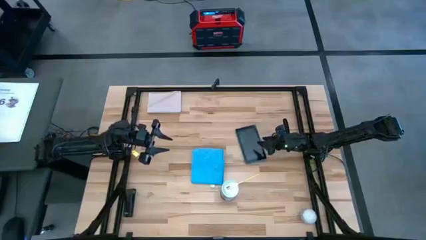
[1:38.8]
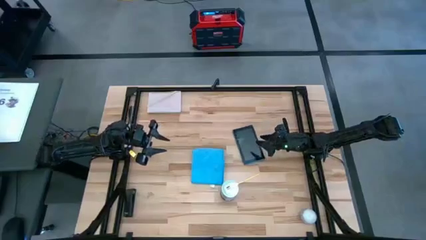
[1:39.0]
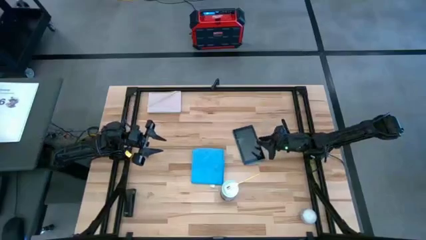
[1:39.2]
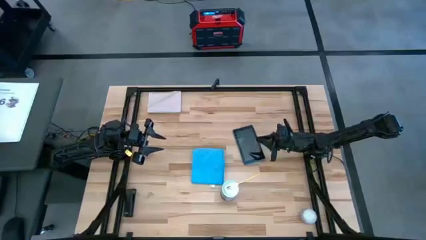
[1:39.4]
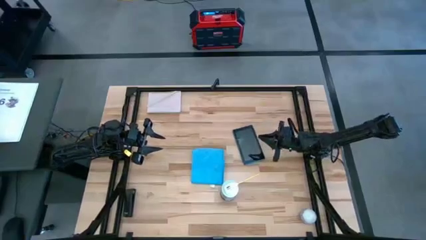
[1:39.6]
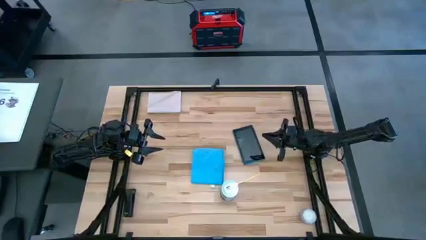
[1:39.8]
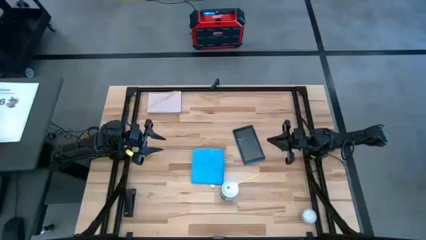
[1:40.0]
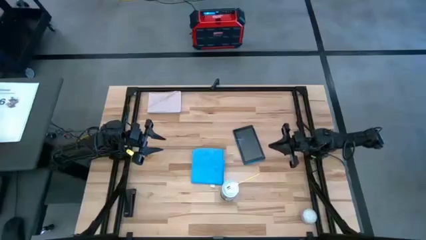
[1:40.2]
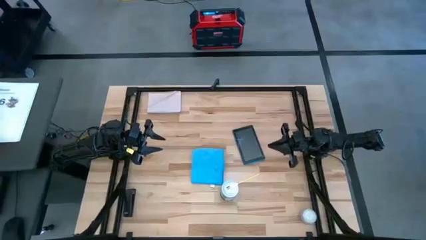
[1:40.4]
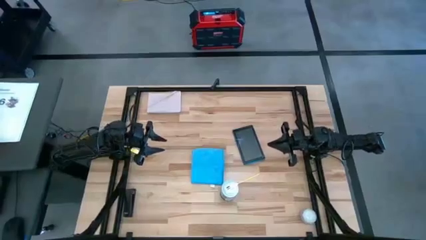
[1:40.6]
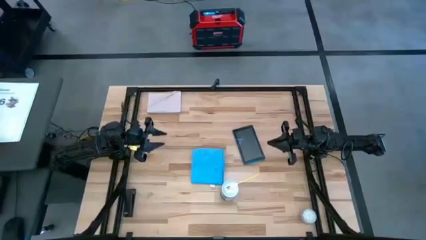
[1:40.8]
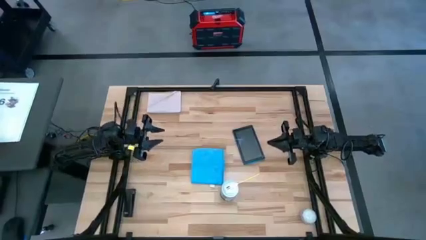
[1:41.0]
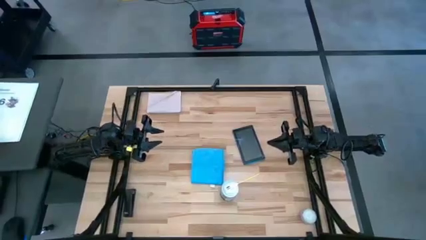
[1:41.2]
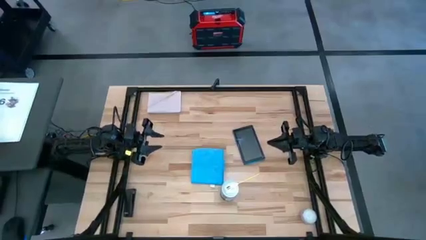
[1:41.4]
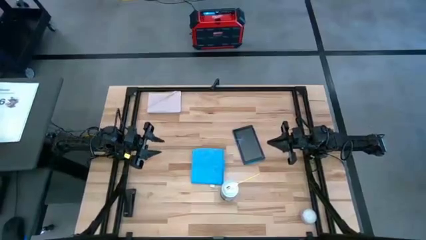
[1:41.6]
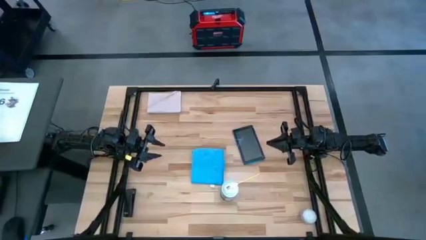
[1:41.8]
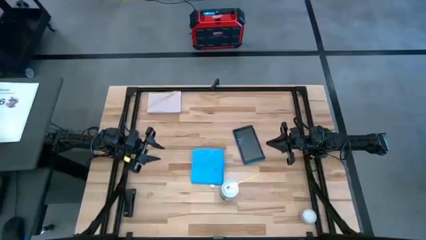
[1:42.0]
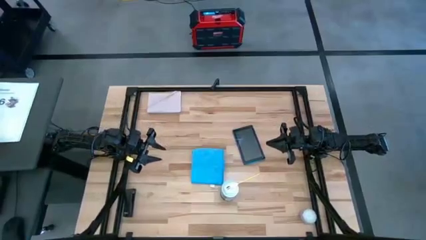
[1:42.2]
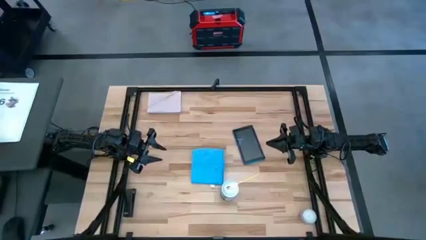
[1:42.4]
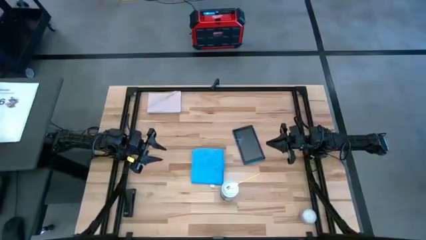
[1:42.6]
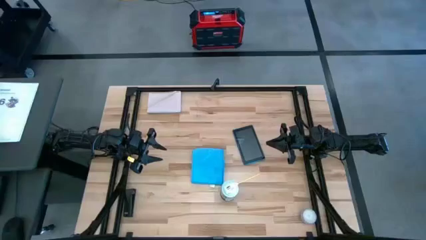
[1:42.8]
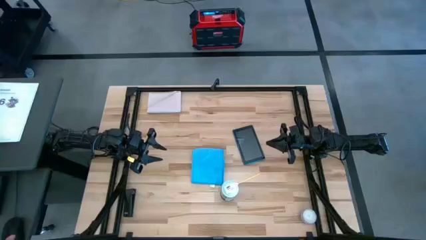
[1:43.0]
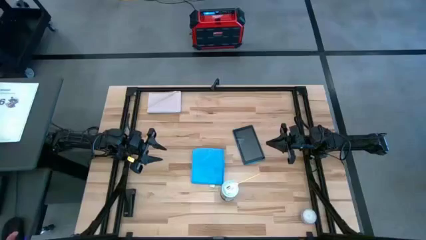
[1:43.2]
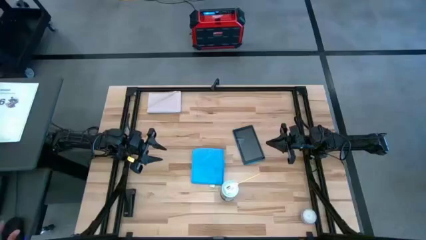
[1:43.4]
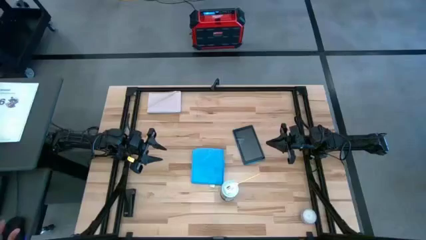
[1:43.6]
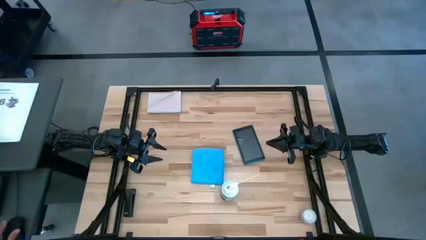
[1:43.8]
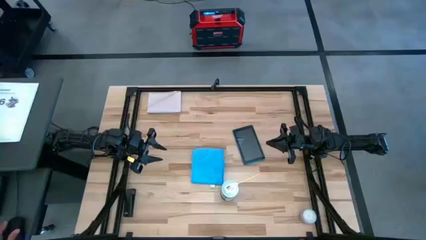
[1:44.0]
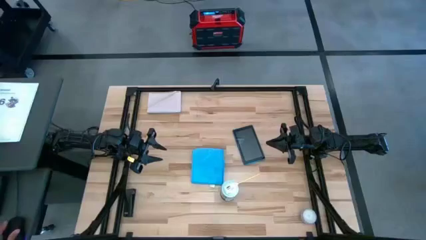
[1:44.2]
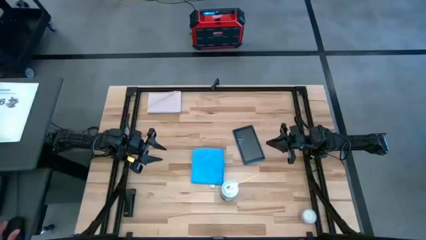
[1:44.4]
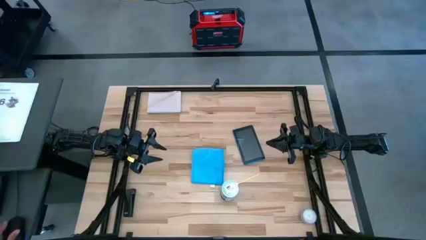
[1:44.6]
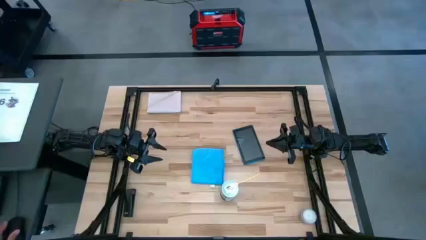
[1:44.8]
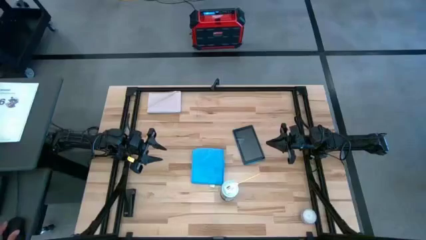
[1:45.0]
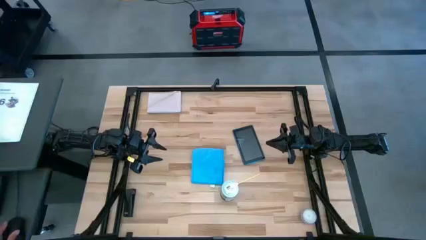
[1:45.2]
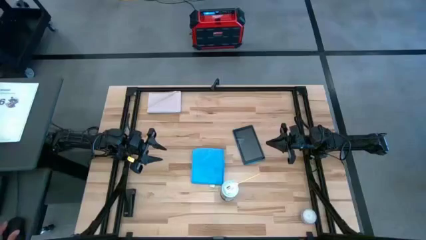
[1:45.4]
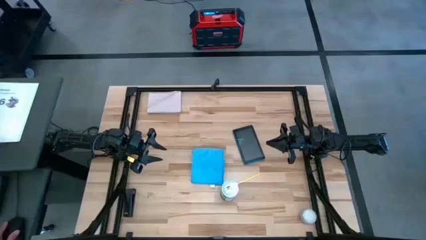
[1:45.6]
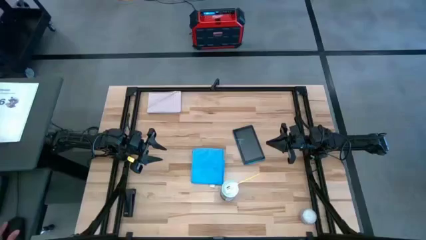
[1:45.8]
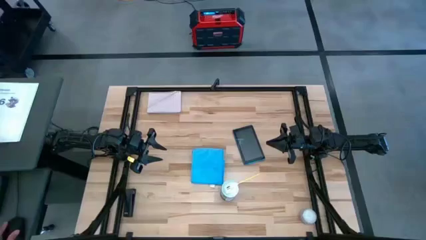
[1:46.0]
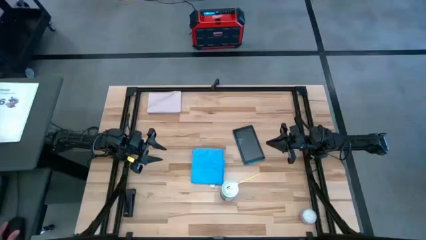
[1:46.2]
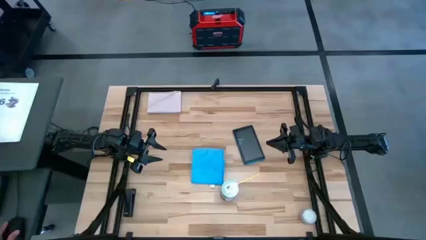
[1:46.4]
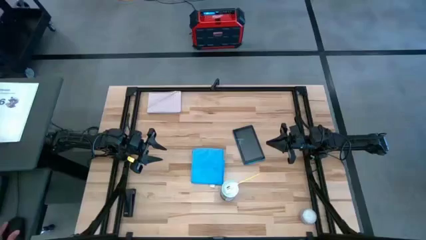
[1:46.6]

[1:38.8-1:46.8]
Task: Apply microfiber cloth
Return to Home Position
